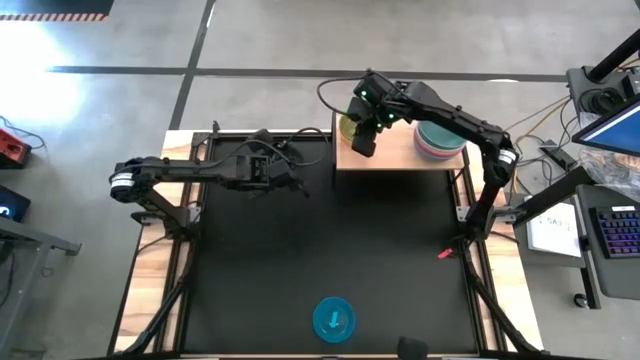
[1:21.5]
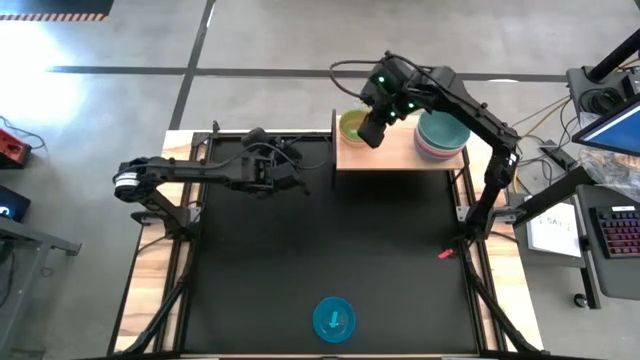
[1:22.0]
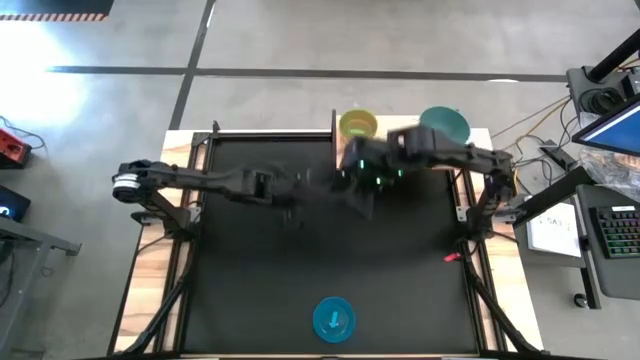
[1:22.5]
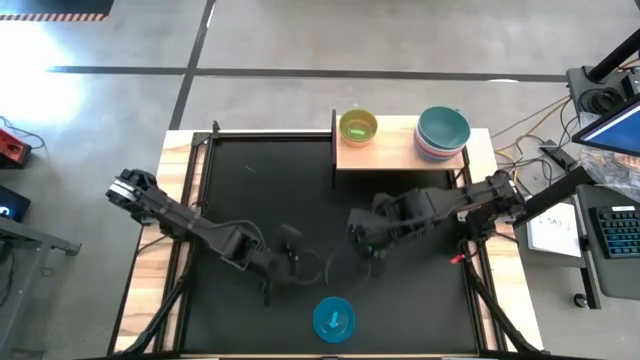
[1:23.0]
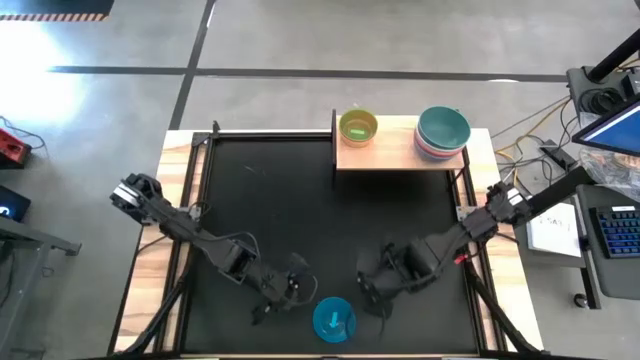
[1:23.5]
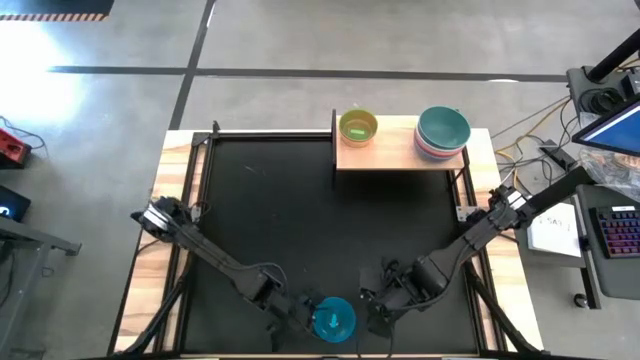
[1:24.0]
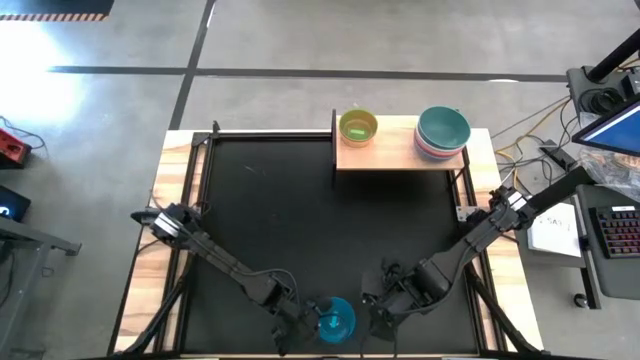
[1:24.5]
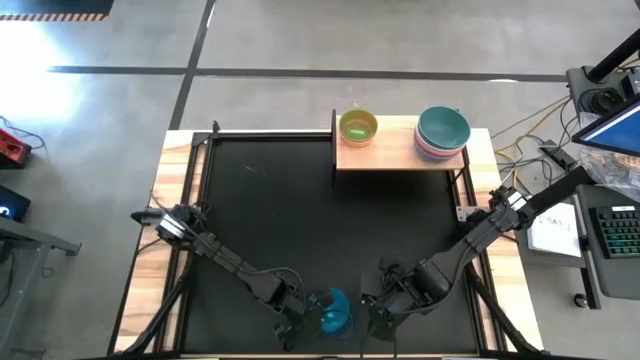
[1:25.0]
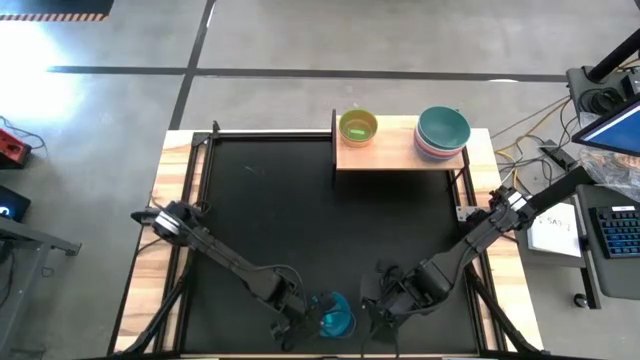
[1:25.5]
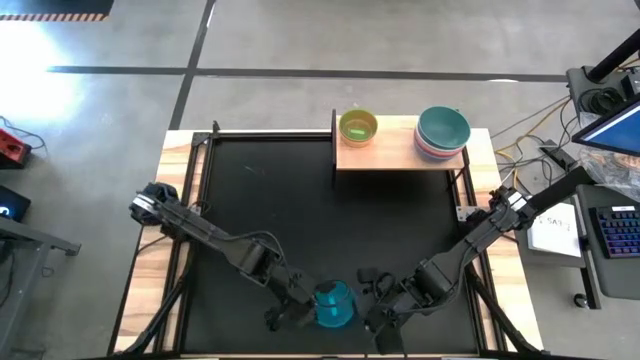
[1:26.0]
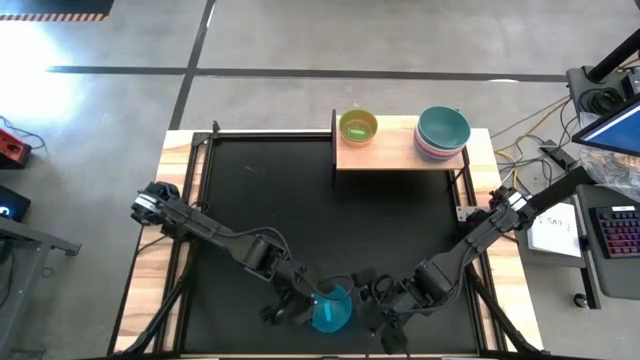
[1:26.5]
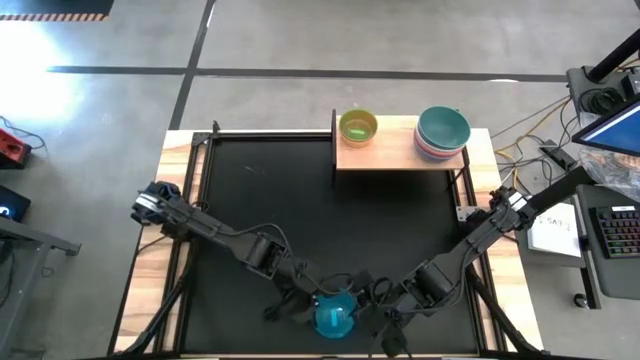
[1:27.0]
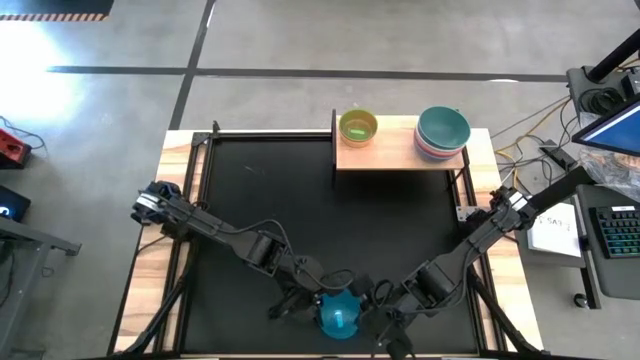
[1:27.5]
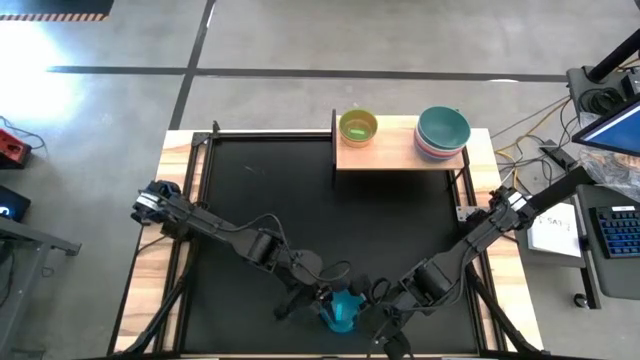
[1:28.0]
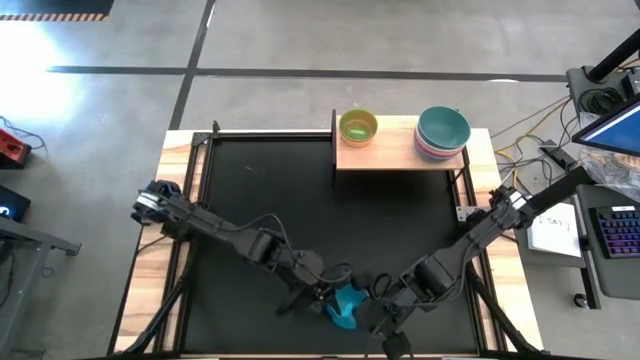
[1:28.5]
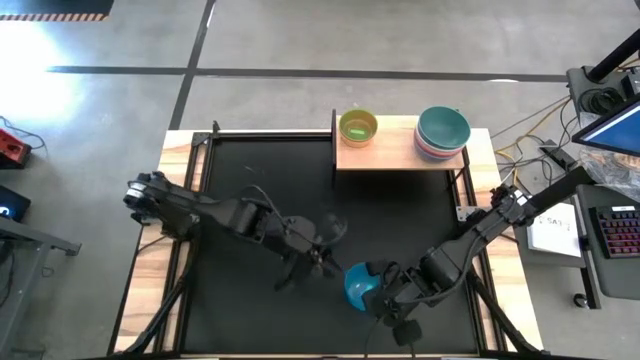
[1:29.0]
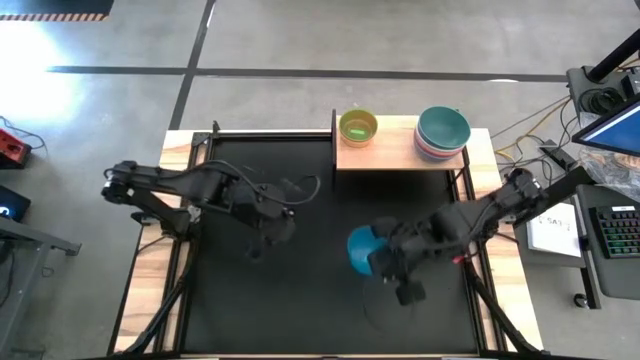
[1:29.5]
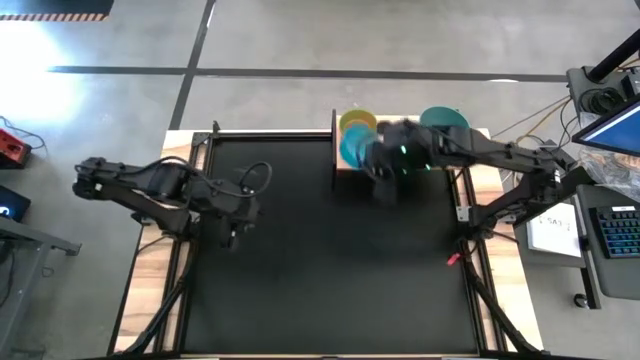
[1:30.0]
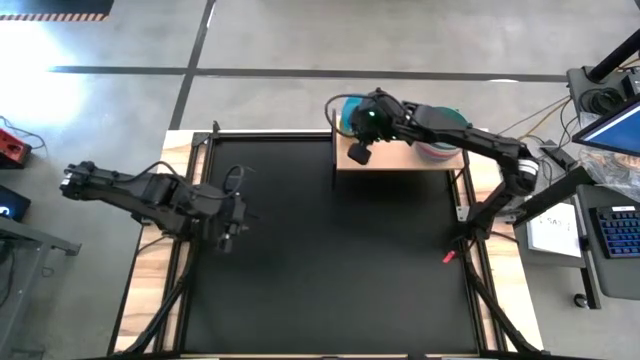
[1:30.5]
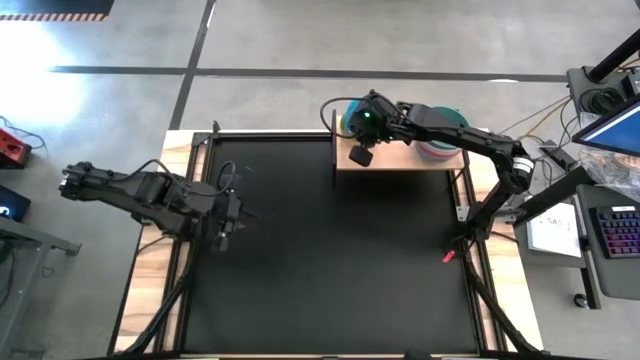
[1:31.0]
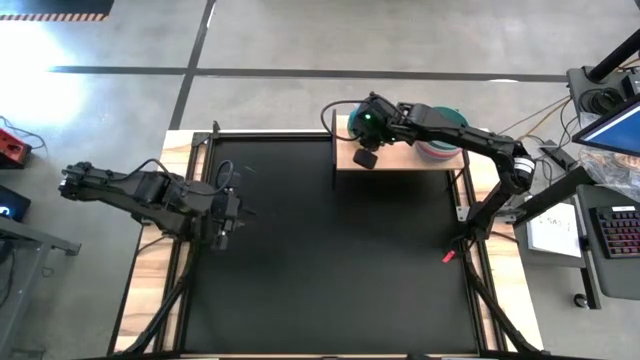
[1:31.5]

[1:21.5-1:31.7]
Task: Place and stack bowls onto a shelf
Stack the blue bowl on top of the green stacked bowls on the shelf

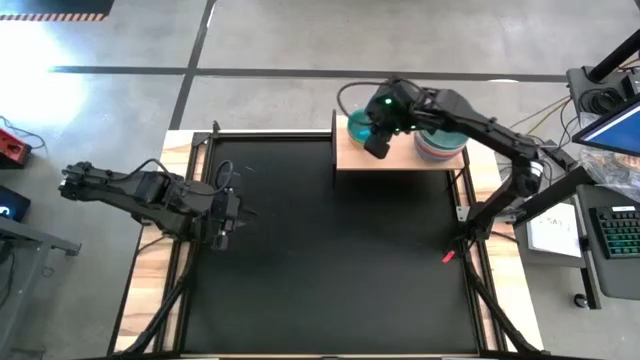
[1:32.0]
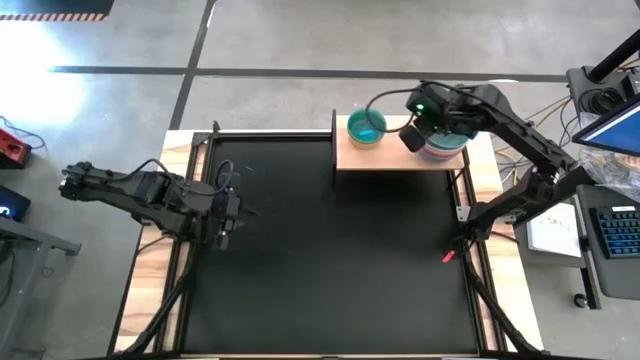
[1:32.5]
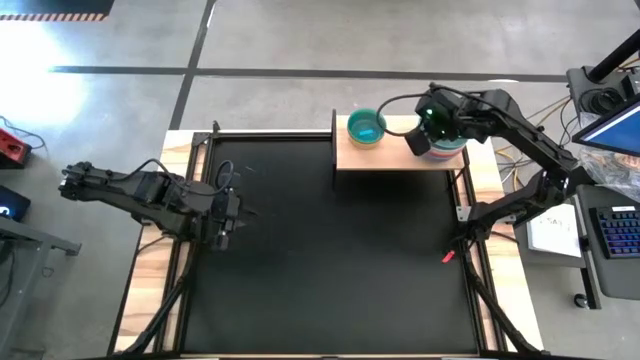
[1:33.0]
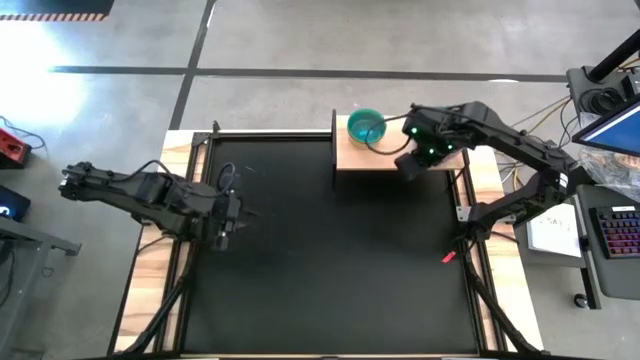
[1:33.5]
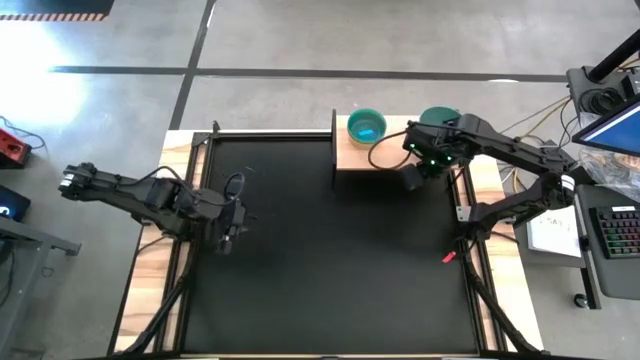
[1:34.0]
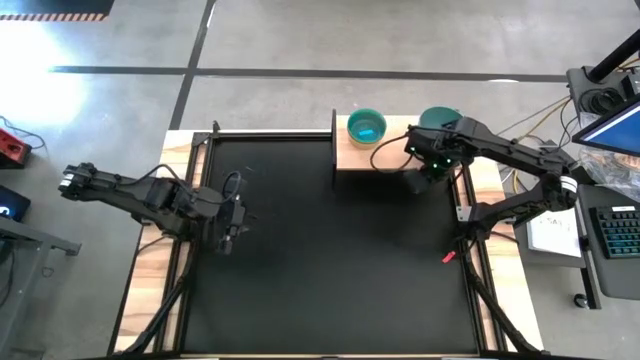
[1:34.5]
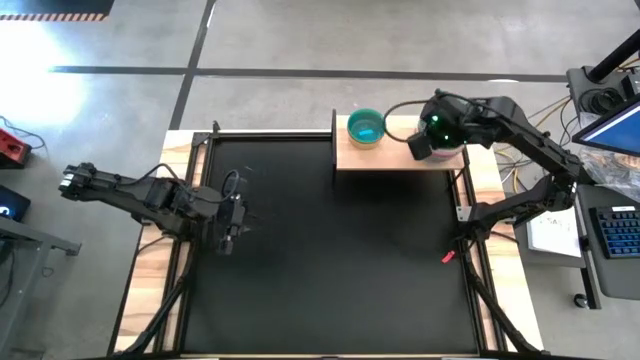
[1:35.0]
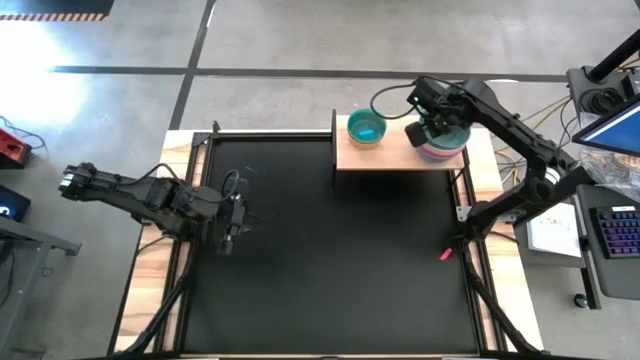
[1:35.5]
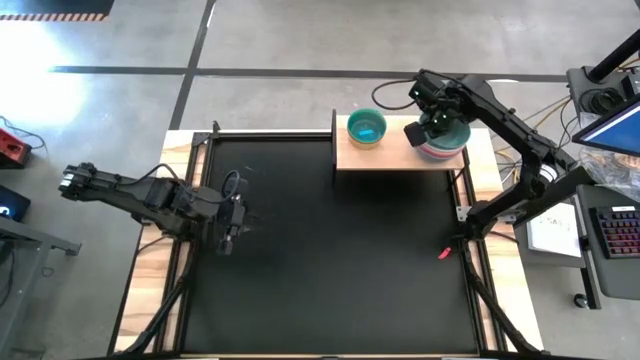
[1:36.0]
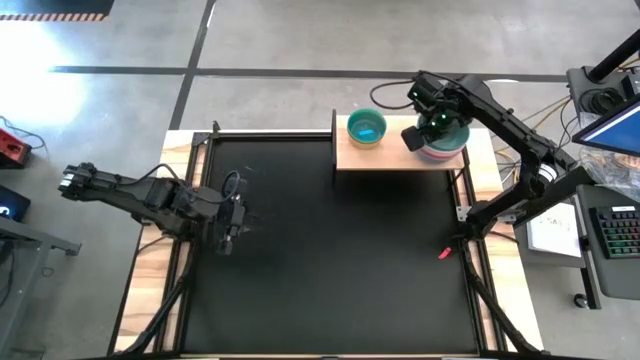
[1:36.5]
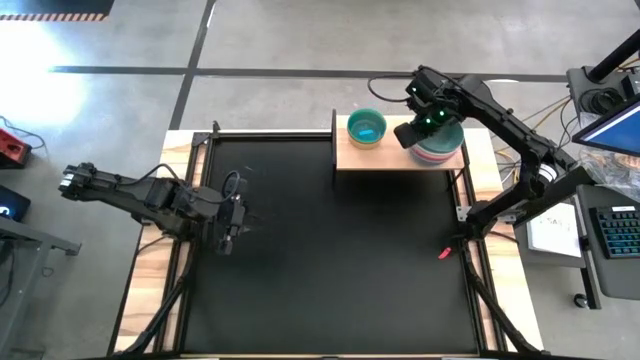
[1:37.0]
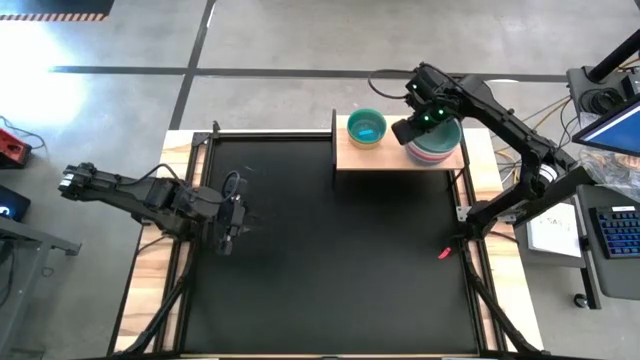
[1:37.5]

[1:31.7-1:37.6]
Adjust the stacked bowls on the shelf

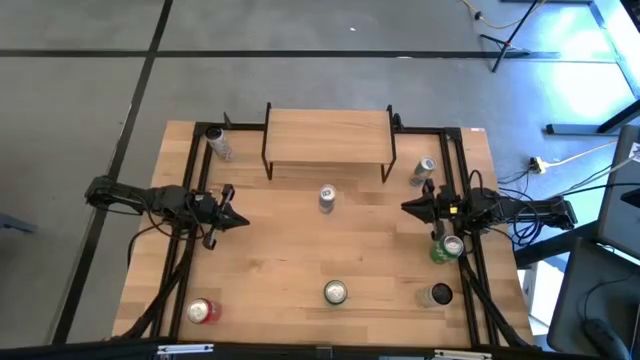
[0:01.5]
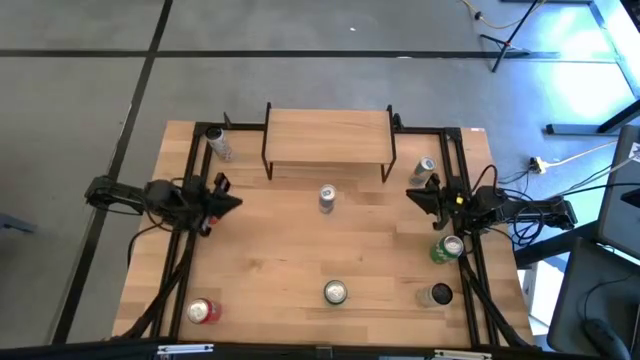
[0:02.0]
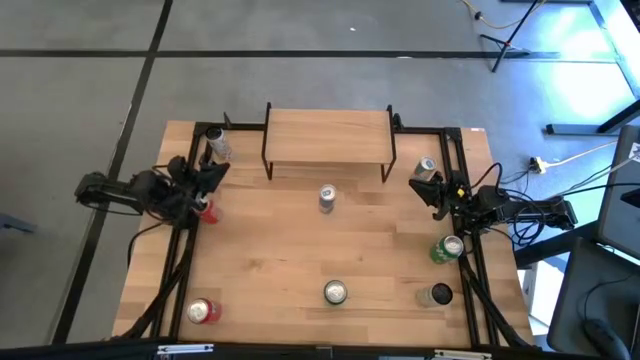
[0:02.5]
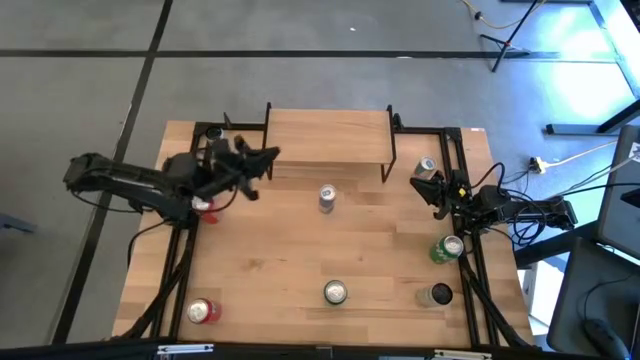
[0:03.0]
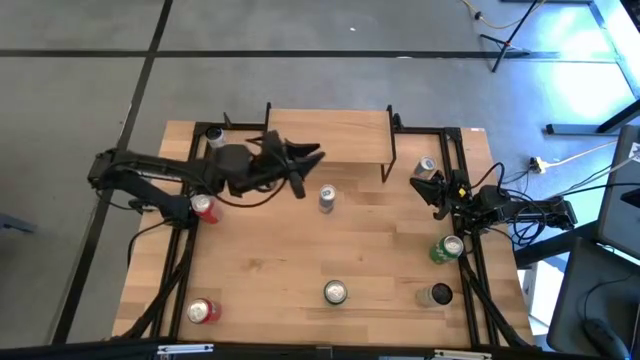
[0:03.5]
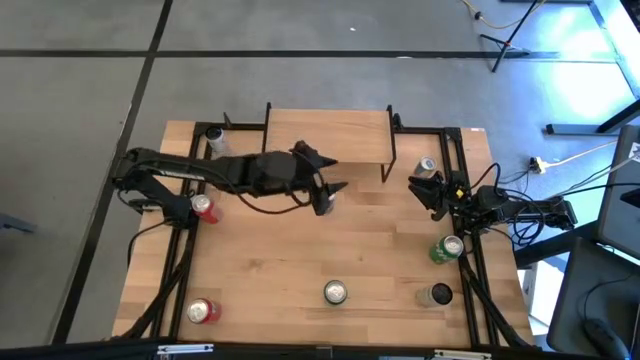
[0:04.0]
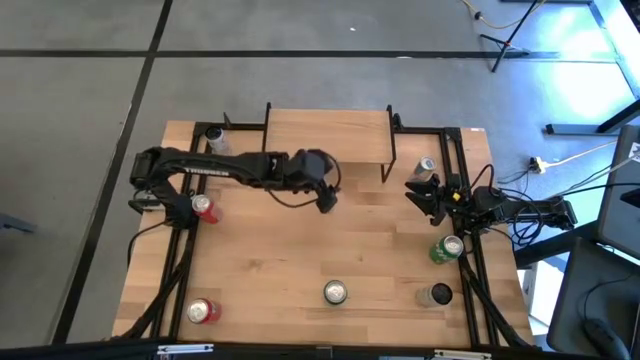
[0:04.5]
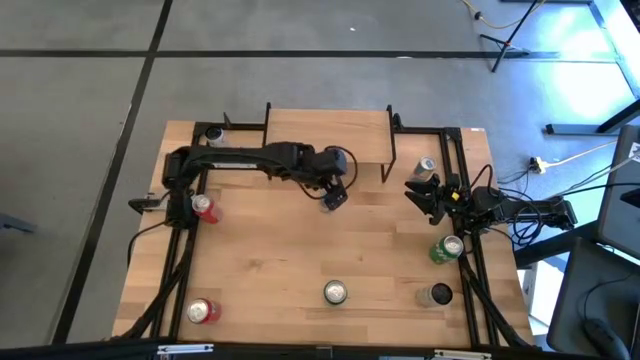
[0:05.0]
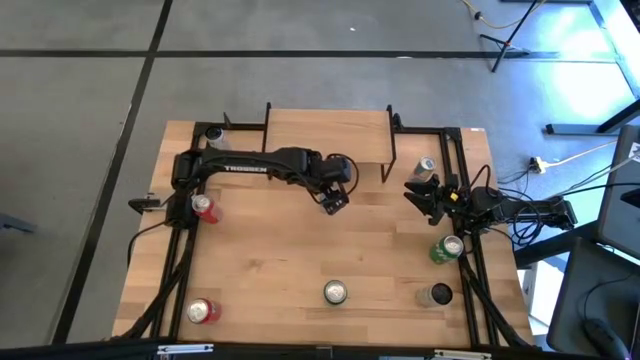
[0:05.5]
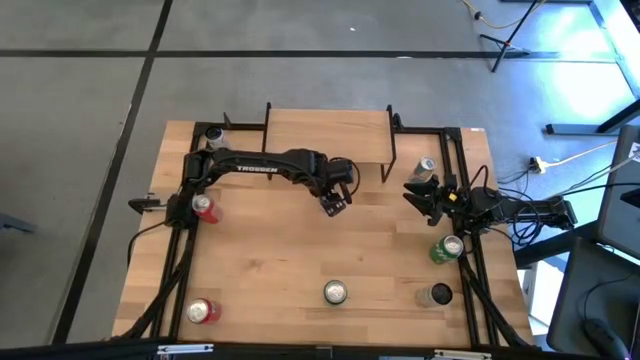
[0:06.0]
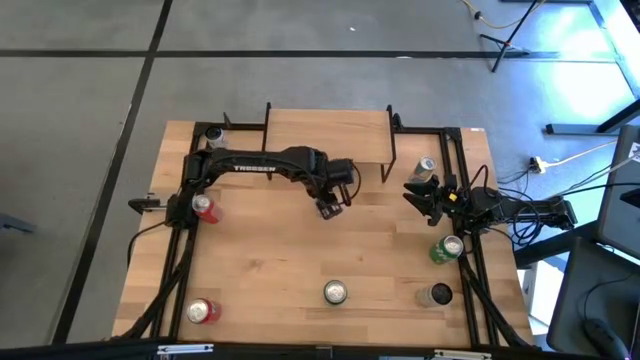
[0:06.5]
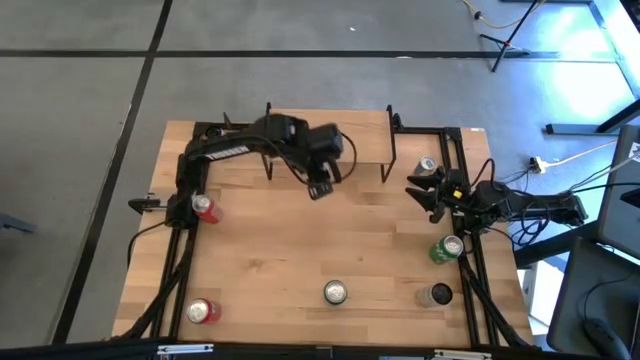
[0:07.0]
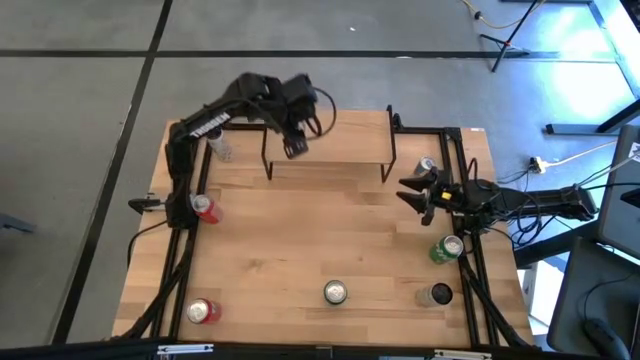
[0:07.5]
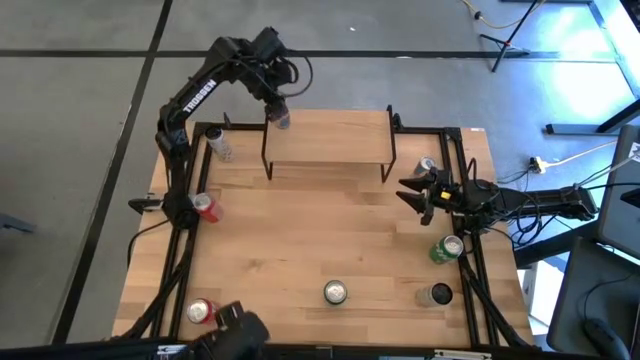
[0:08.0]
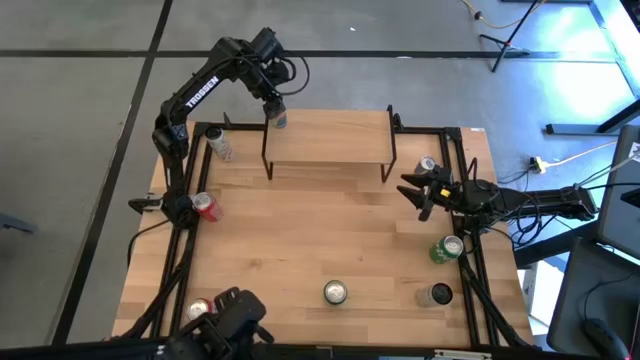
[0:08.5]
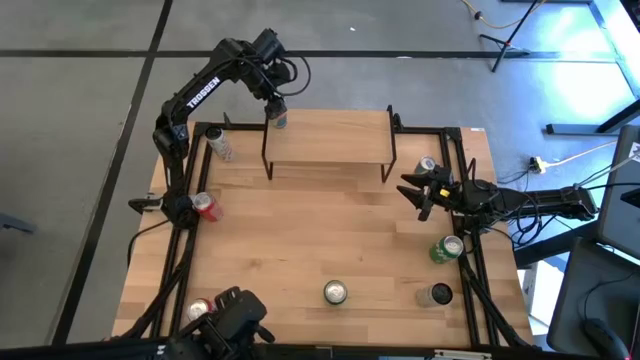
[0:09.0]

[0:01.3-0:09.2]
Task: Place canned beverage on shelf
Put the left blue soda can on the shelf
